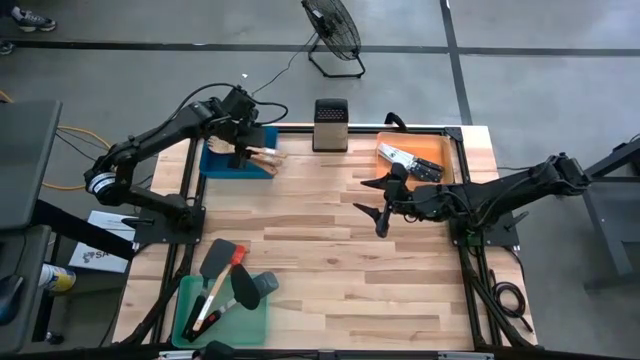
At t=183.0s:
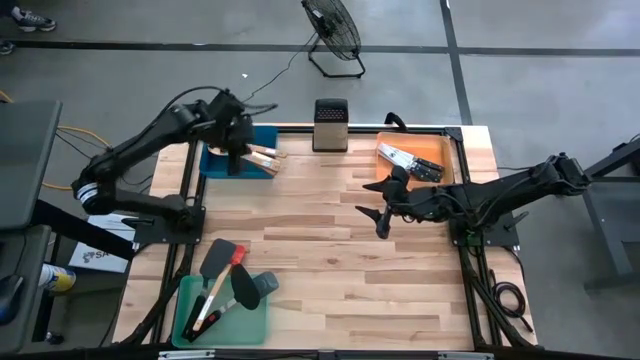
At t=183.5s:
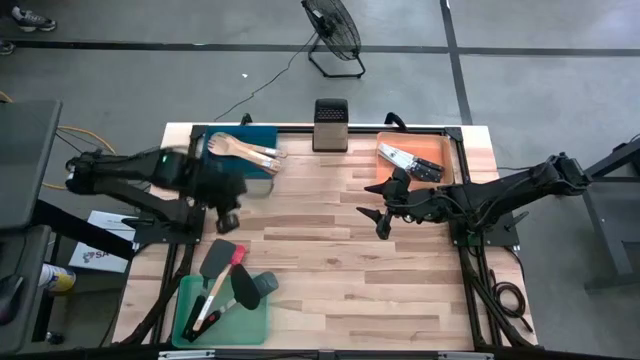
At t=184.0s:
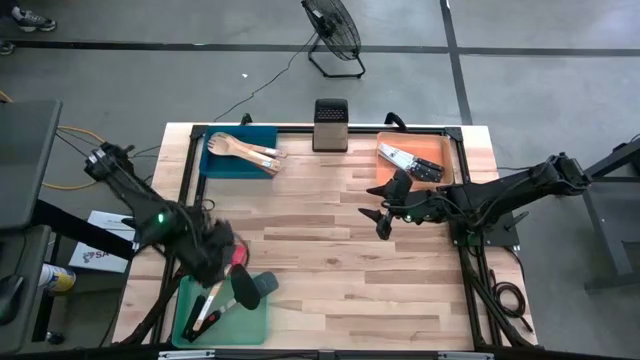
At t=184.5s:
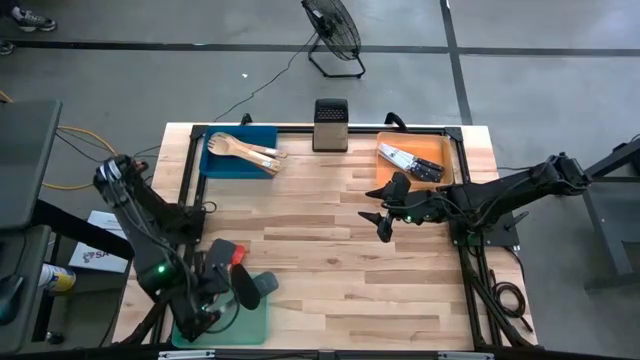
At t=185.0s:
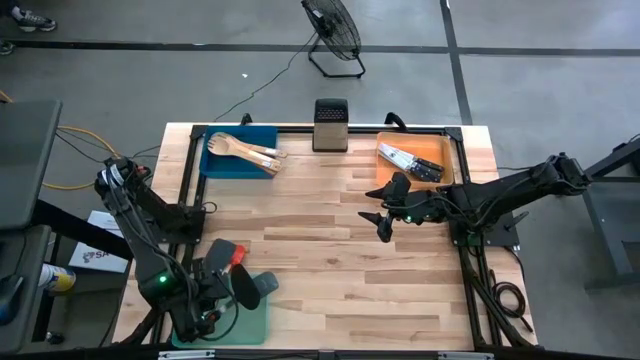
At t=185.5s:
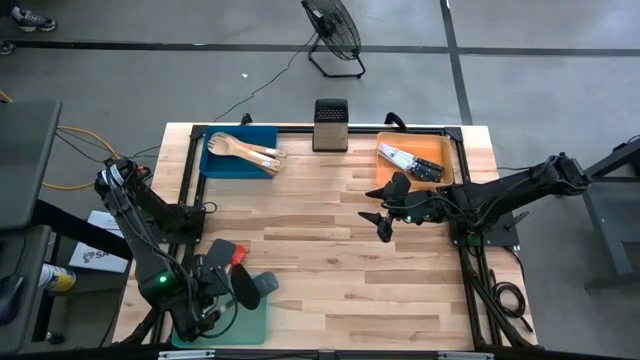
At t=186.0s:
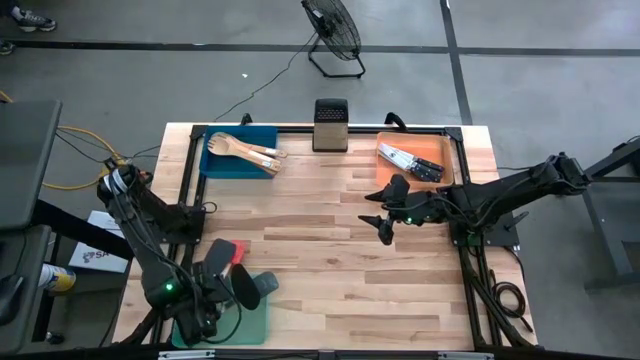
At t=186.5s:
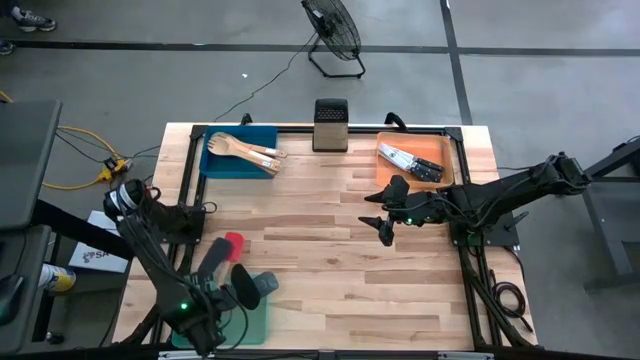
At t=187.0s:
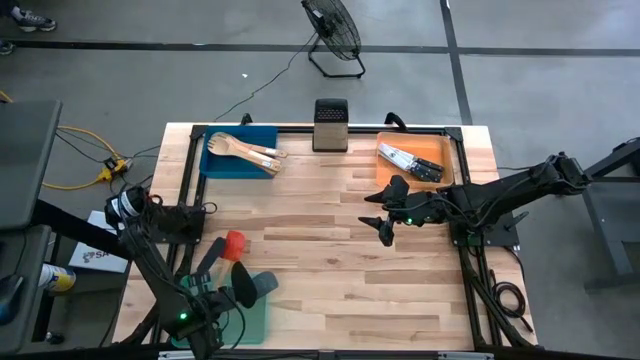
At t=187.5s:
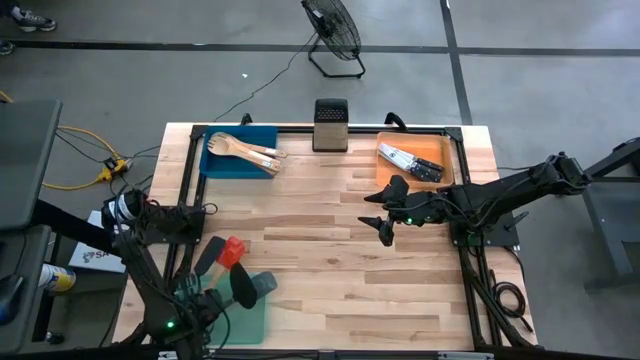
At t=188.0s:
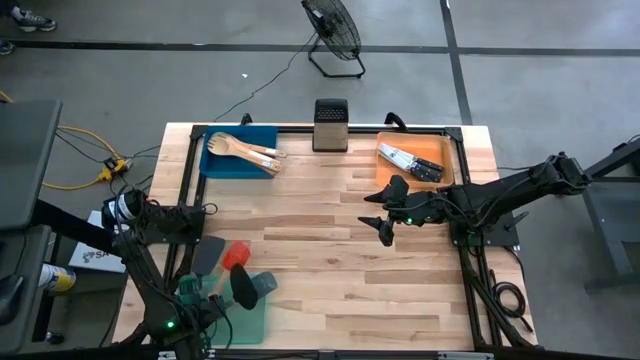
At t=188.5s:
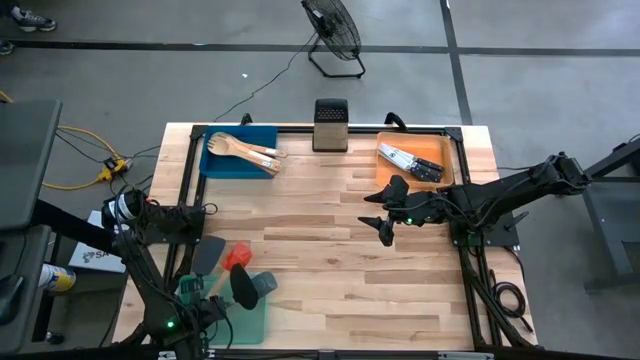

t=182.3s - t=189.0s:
Task: Pick & Place Kitchen Items
Adjust the spatulas in the green bin

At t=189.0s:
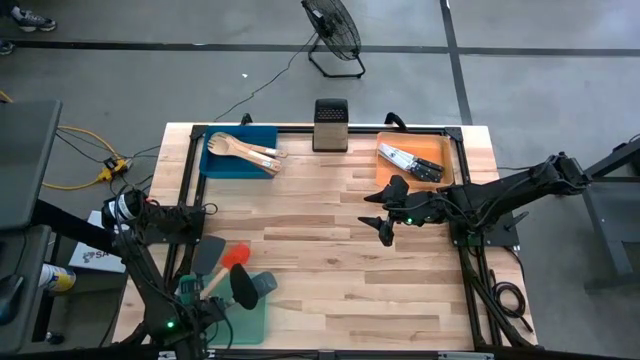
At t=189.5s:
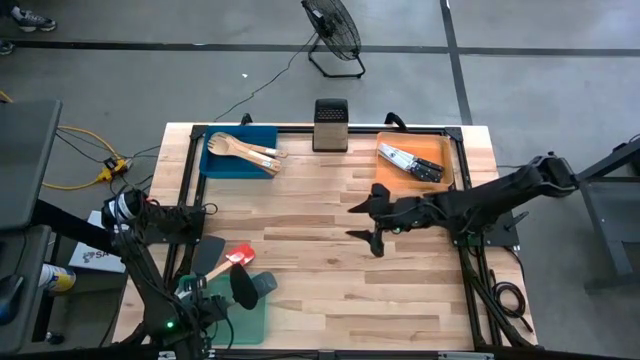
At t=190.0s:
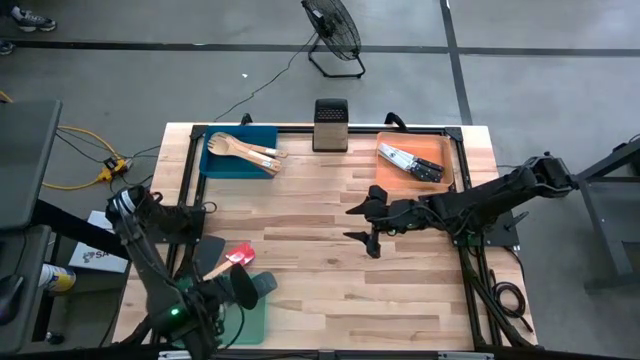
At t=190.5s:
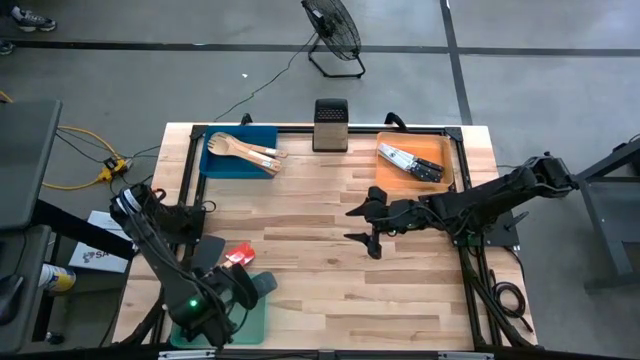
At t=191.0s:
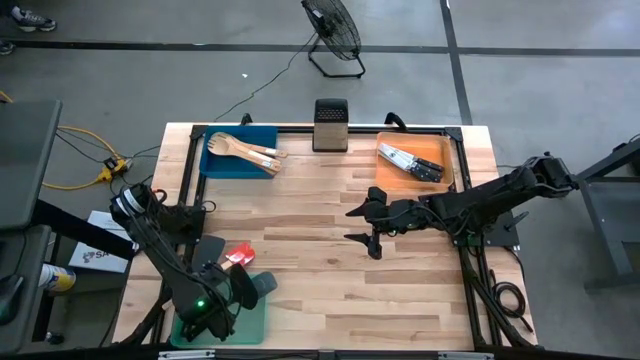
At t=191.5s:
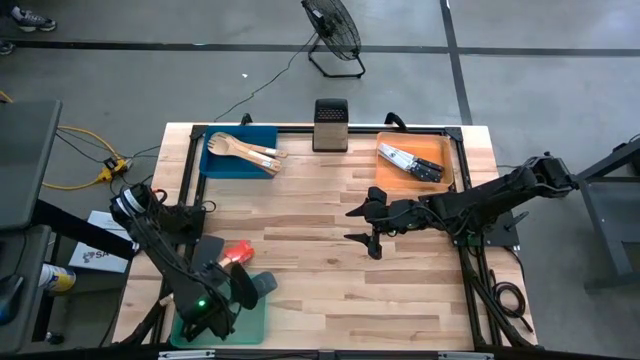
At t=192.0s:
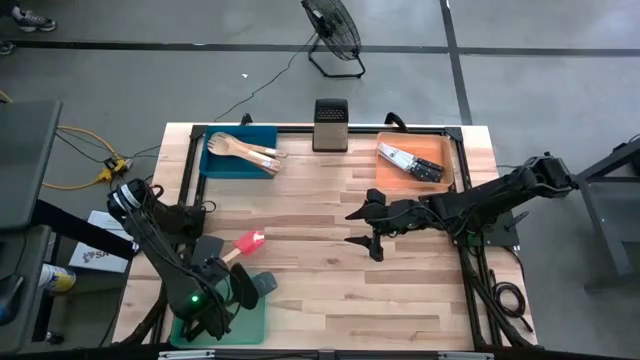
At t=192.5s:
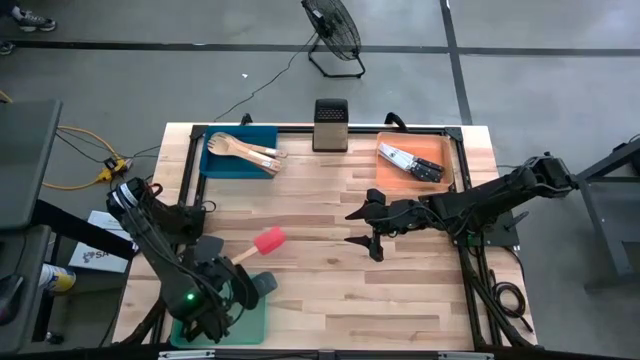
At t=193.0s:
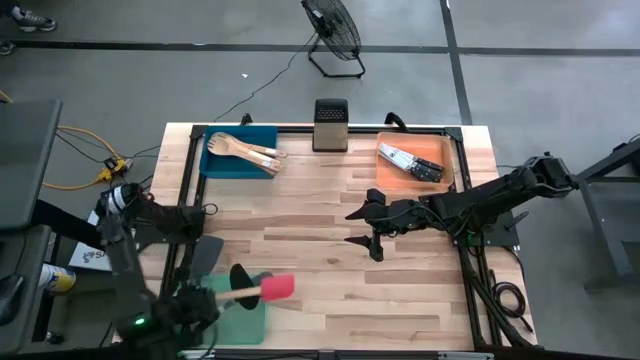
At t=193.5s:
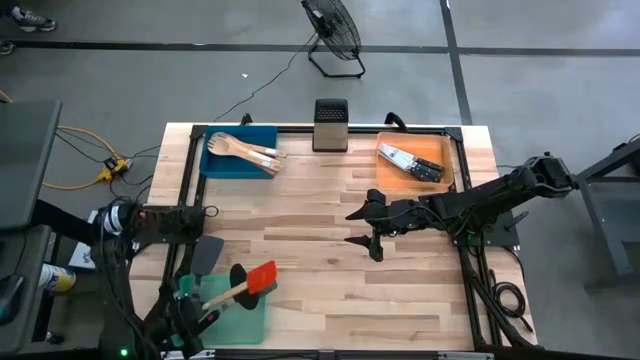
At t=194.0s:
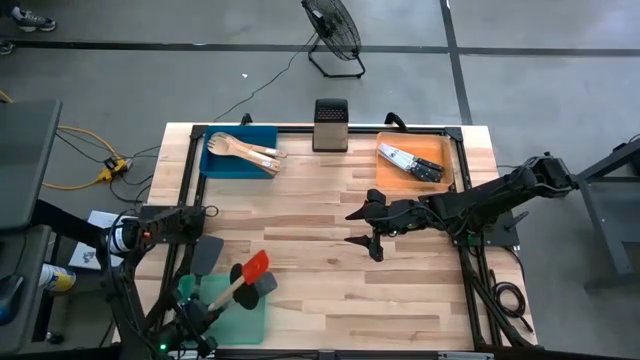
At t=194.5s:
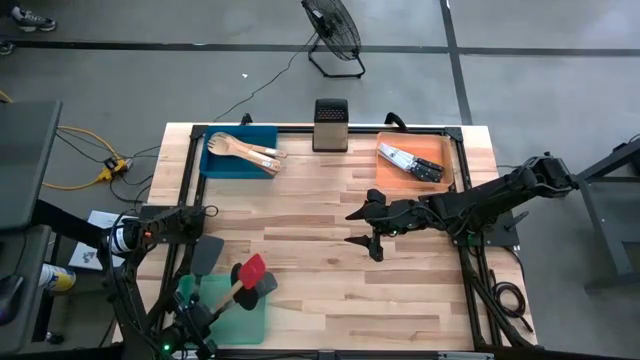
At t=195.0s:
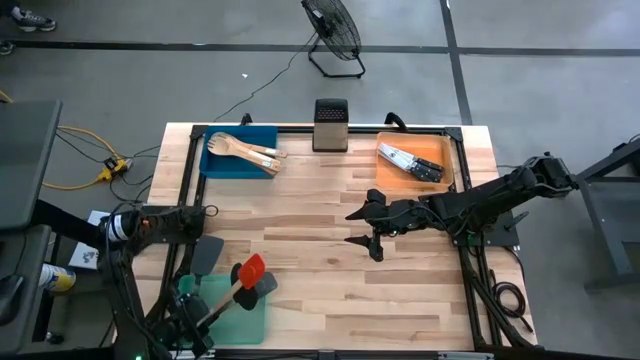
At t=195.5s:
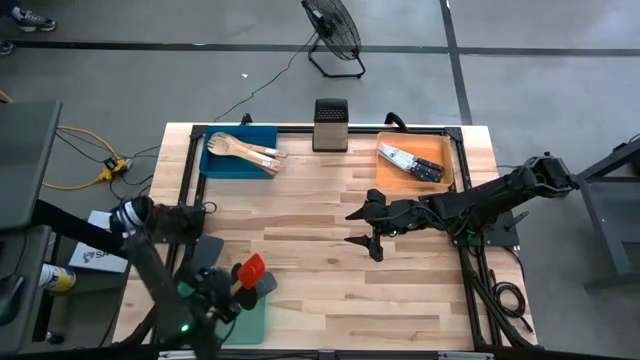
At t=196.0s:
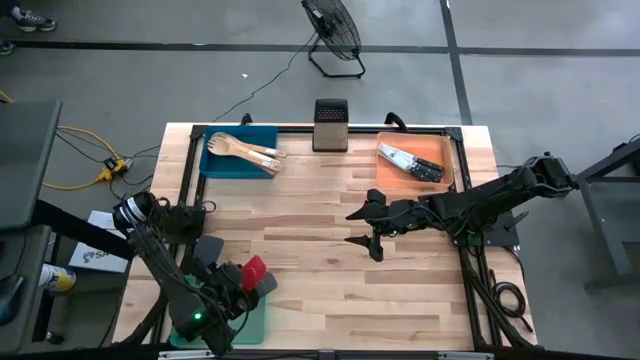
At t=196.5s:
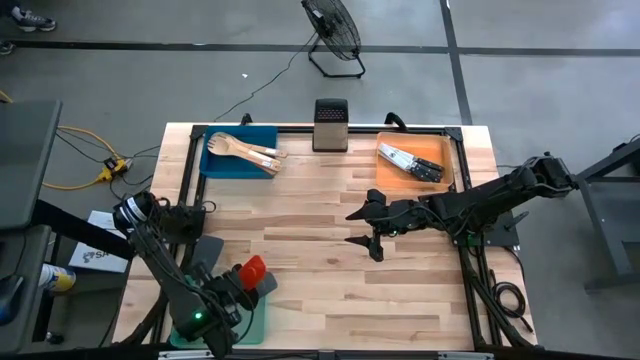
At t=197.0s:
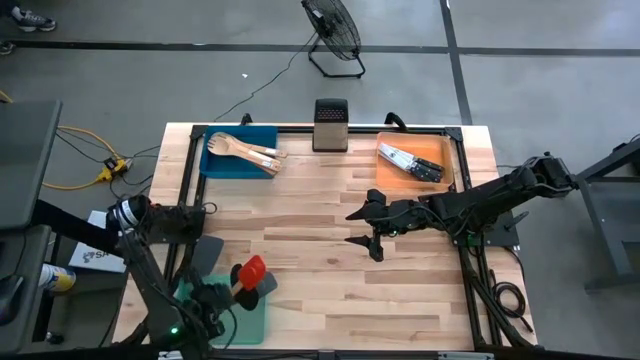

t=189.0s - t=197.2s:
Adjust the spatulas in the green bin

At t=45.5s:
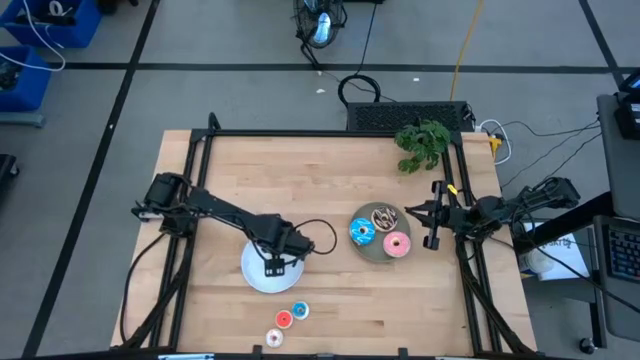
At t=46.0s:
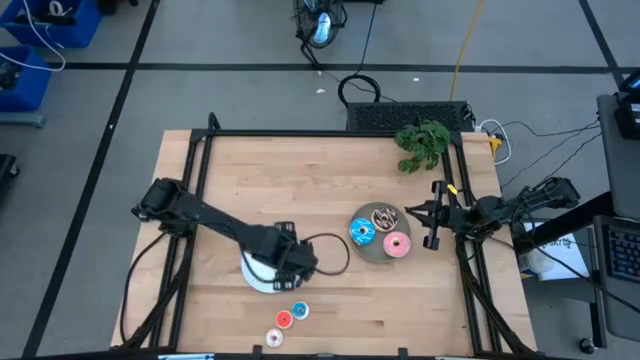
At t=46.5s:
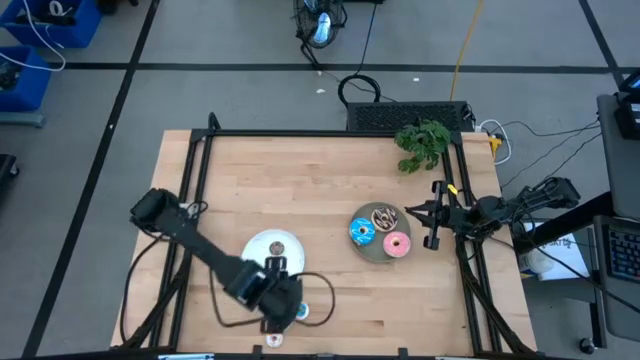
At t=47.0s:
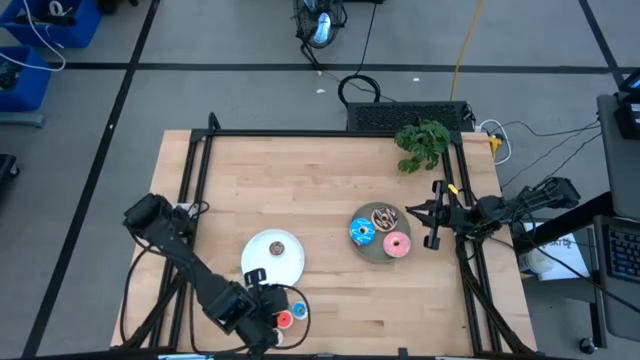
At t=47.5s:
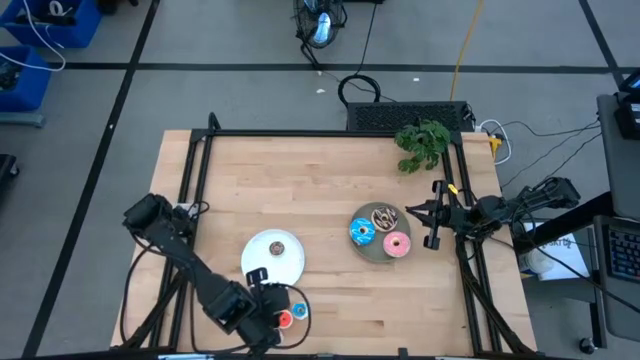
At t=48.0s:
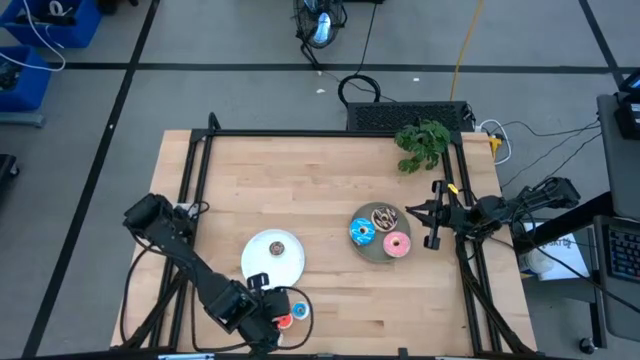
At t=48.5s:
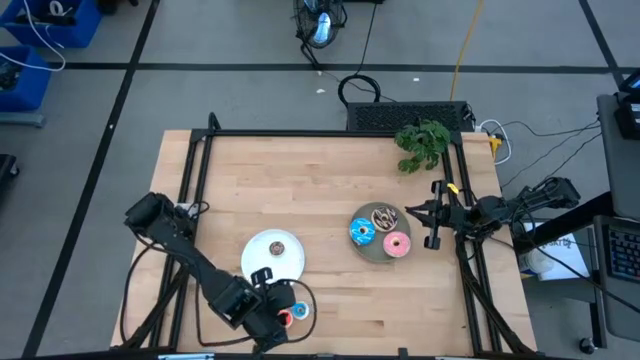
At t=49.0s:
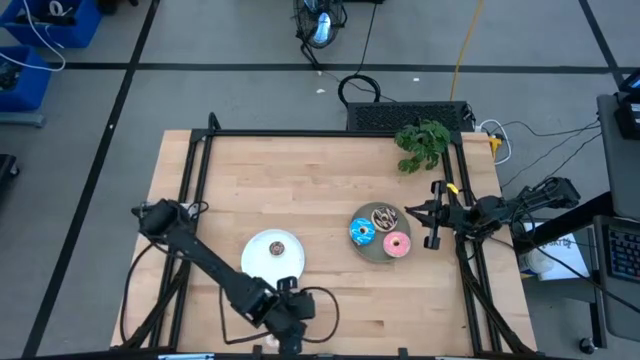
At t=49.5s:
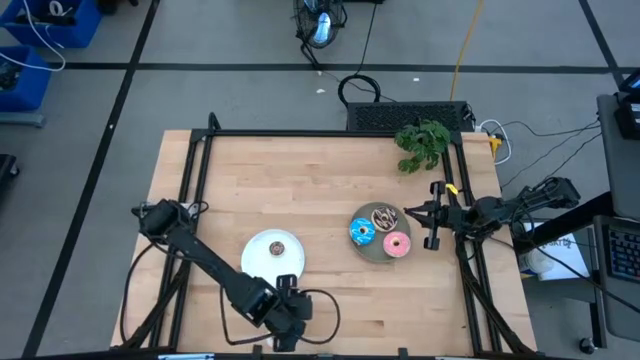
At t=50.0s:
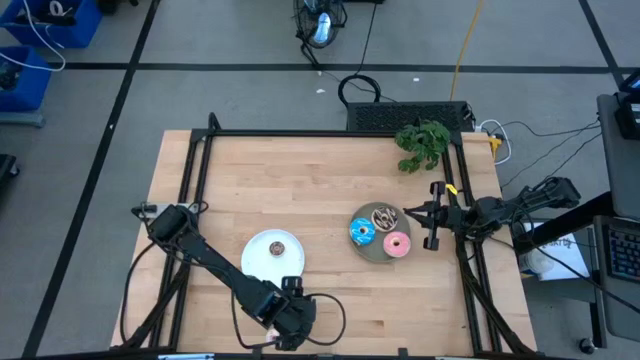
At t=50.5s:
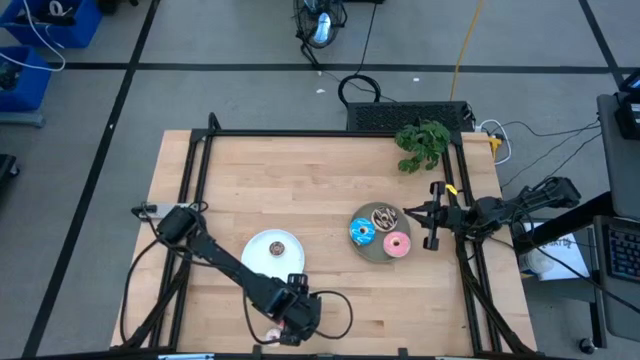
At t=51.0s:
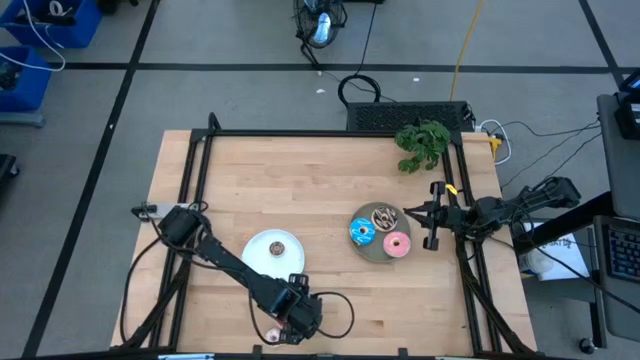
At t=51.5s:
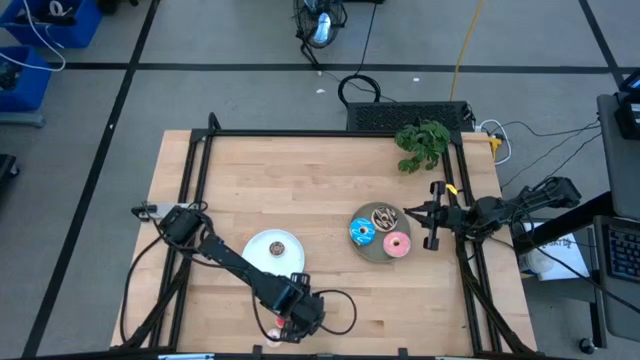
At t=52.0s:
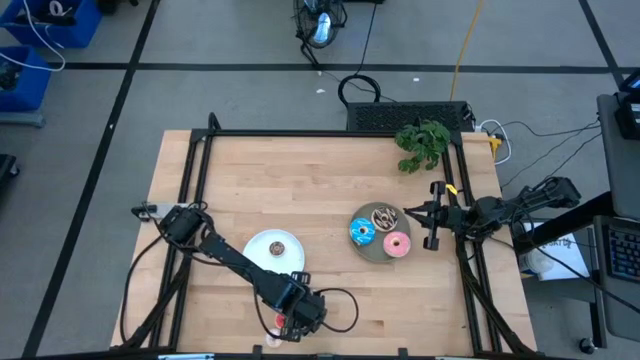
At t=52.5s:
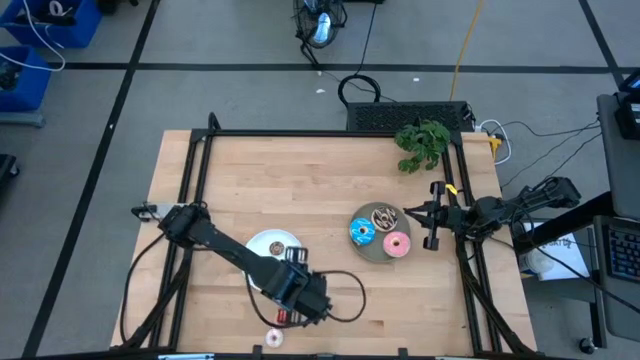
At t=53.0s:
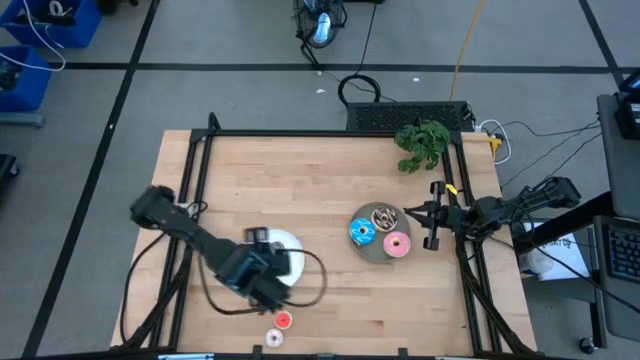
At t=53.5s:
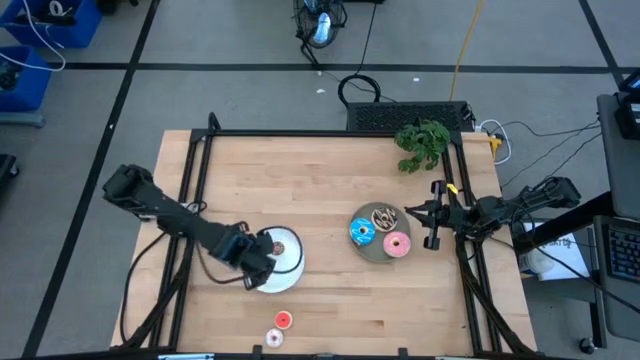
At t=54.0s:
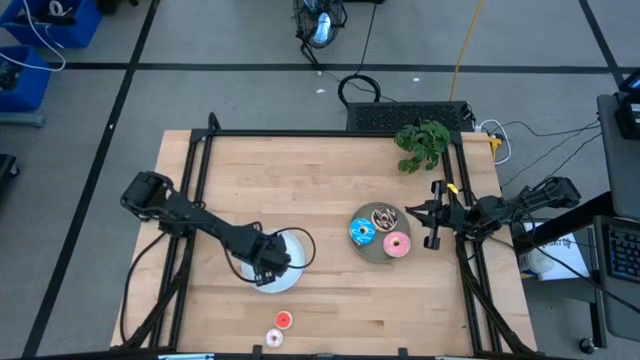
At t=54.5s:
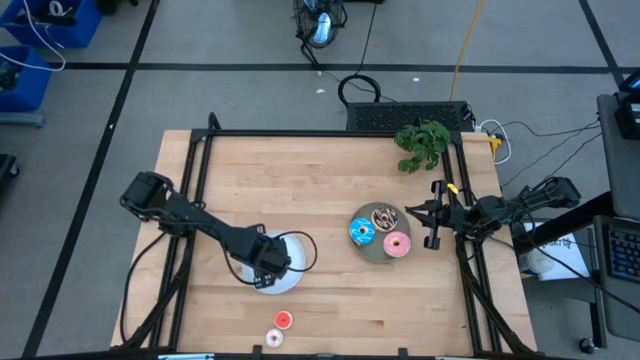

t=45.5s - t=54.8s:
Task: Pick & Place donuts
Put the blue donut on the white plate
